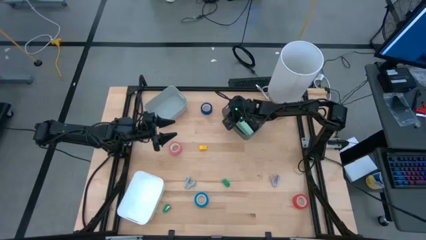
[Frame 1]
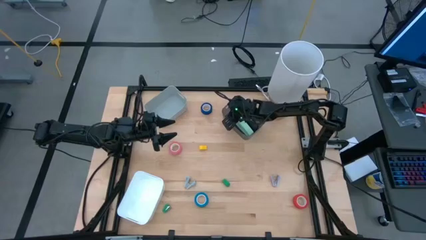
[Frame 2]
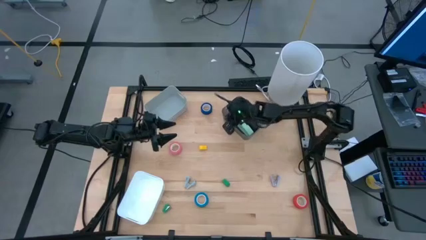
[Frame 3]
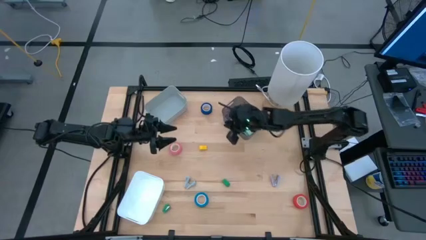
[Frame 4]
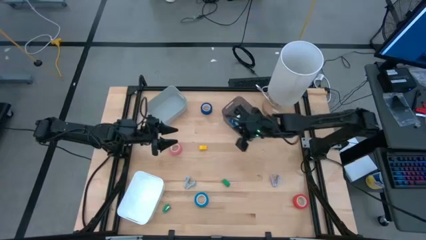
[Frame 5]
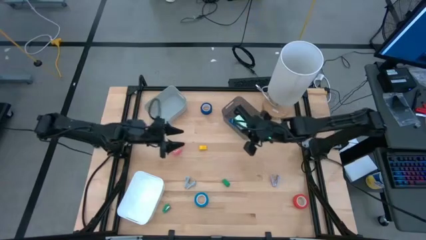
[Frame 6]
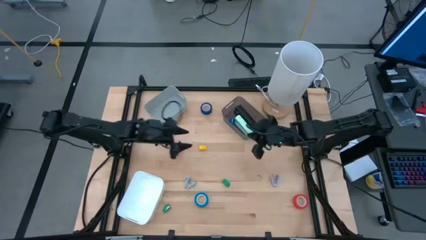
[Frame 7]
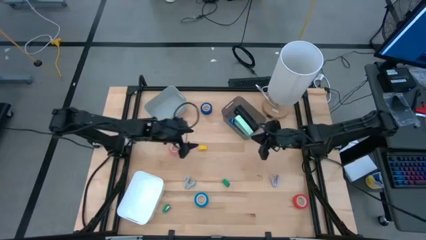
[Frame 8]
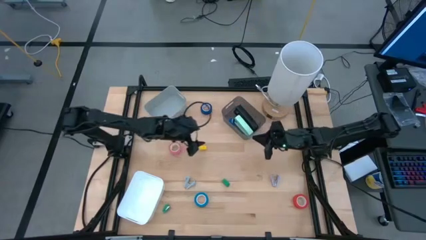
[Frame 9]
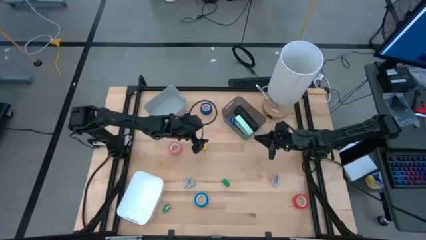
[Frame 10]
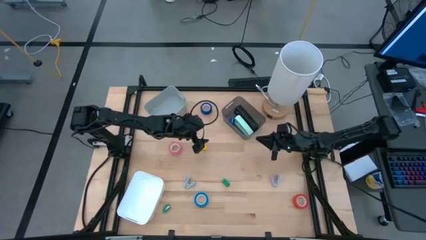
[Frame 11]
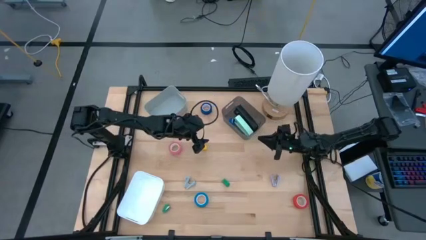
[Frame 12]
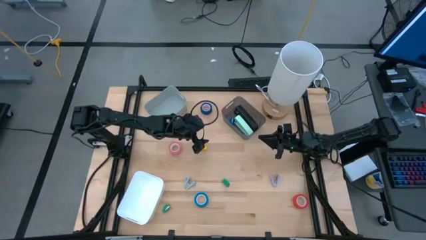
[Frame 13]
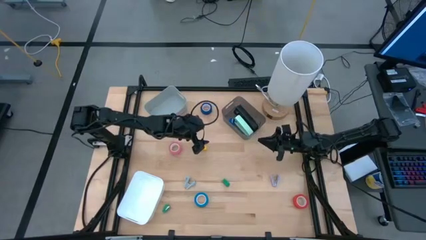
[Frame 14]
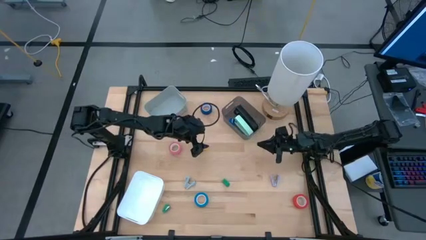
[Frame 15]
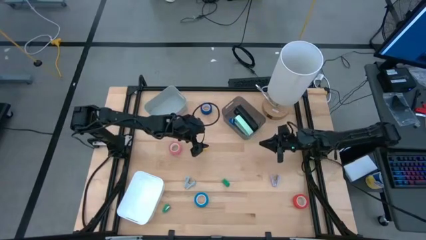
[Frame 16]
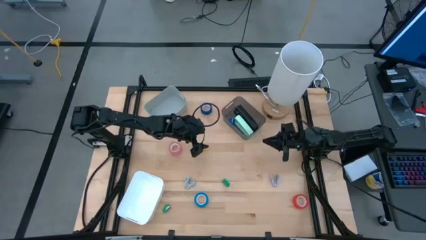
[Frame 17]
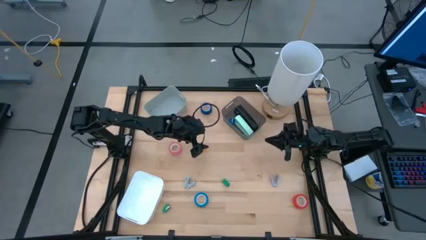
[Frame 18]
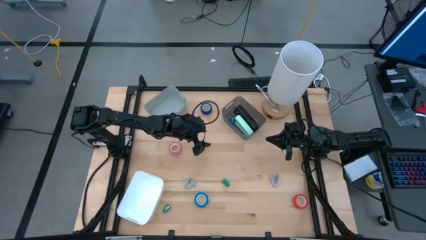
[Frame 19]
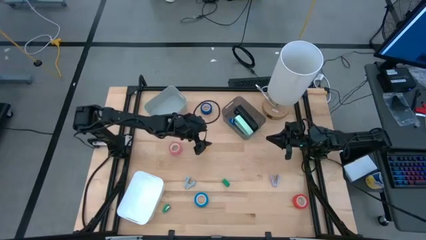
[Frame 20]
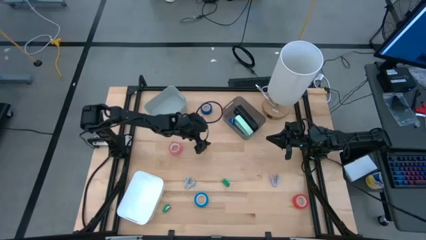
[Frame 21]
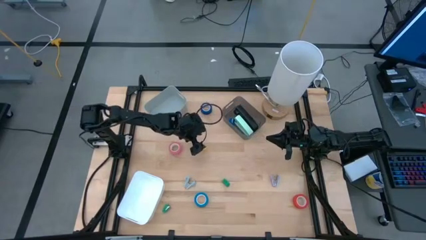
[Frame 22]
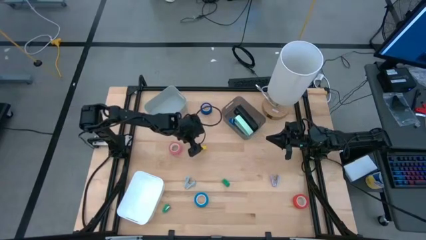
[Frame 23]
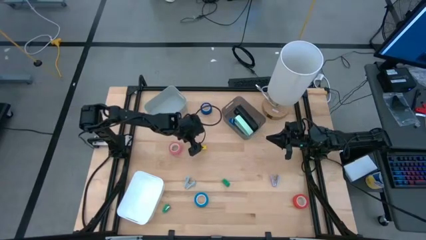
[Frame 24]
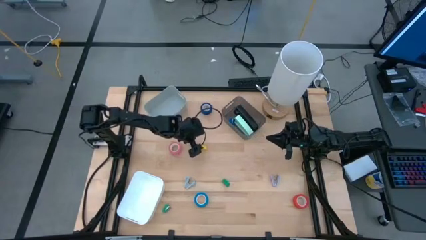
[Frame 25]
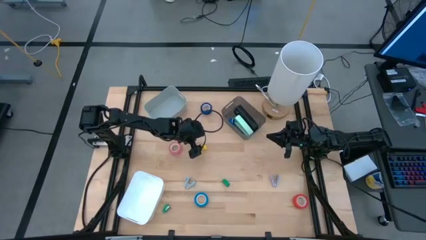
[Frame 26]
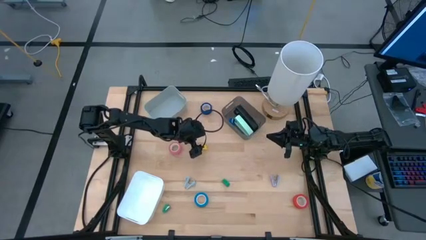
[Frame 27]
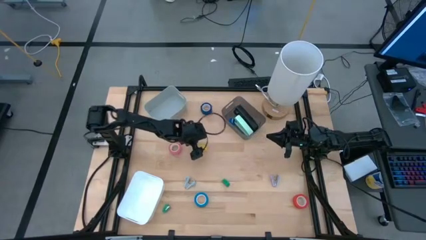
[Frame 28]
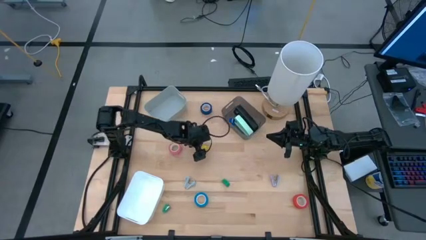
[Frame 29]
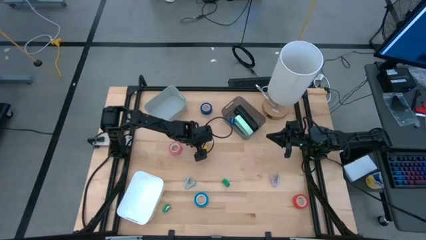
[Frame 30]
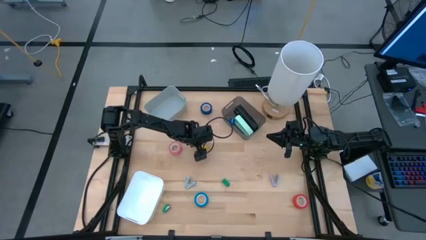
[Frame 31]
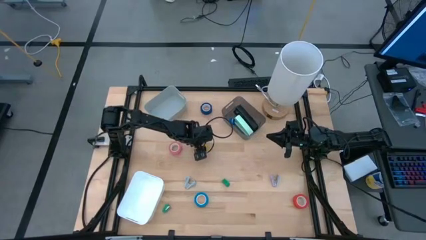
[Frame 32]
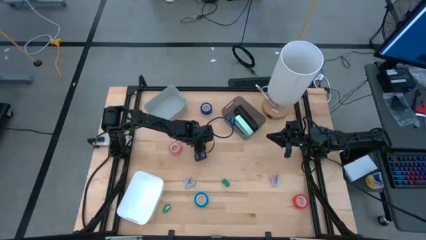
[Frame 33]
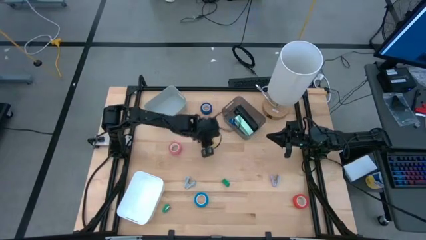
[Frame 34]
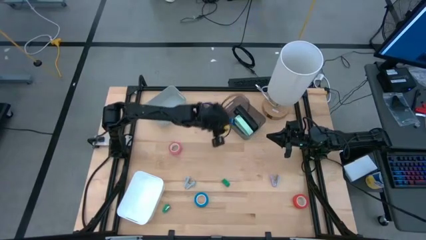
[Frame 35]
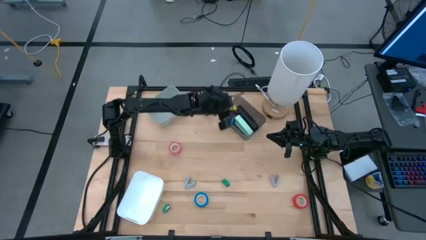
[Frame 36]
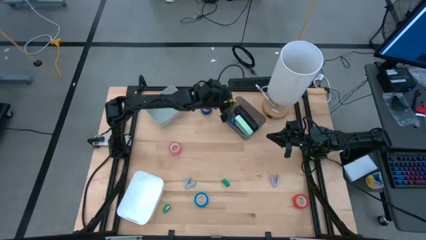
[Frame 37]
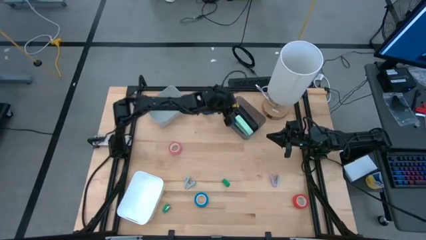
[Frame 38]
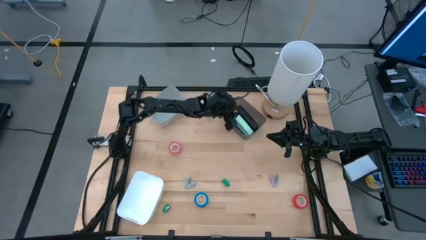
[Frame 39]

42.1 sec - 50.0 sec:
Task: Pick and place Stapler, Stapler remover, tape
Put the yellow stapler into the black bin

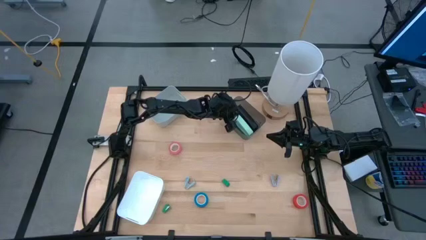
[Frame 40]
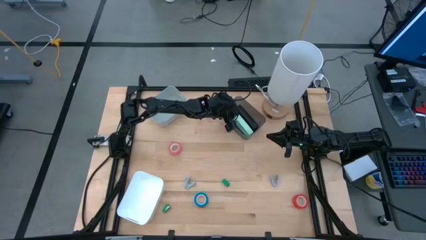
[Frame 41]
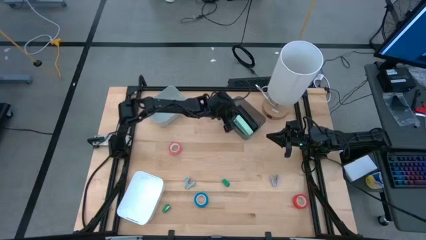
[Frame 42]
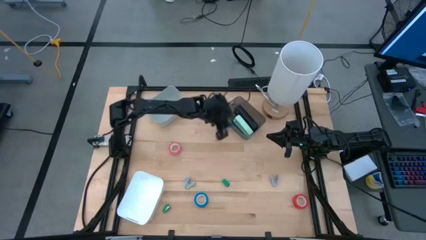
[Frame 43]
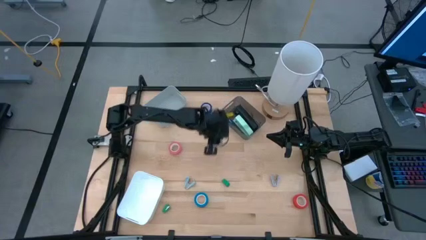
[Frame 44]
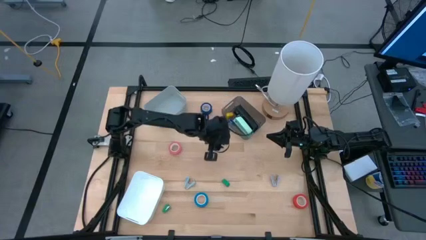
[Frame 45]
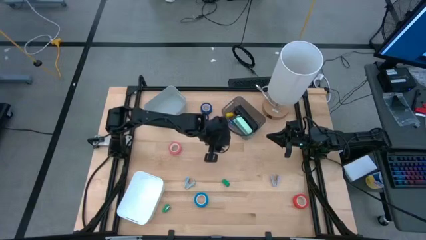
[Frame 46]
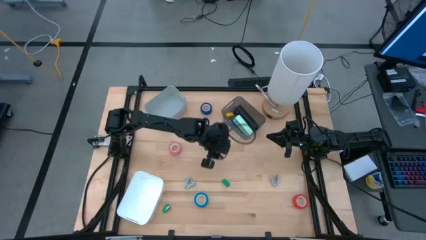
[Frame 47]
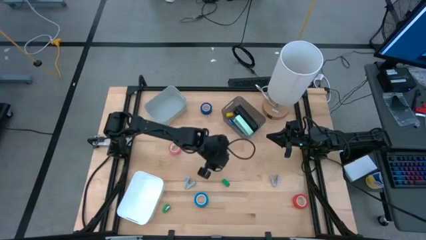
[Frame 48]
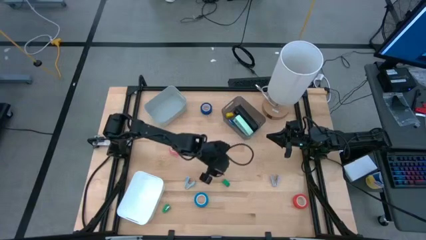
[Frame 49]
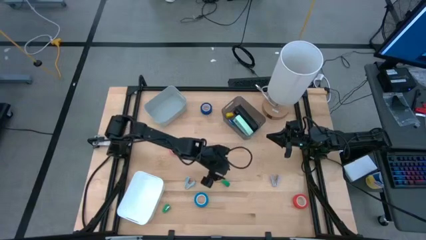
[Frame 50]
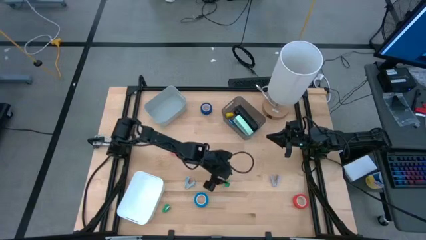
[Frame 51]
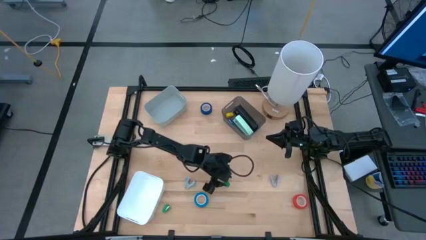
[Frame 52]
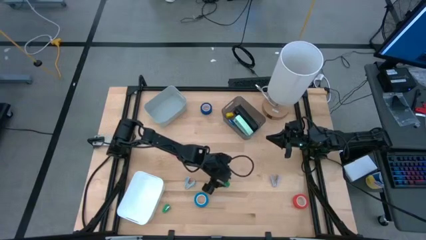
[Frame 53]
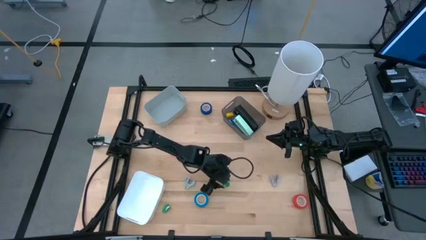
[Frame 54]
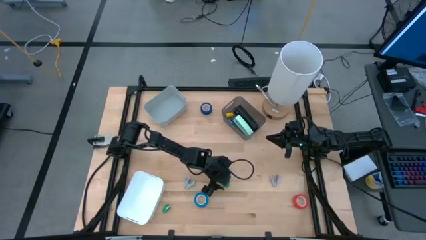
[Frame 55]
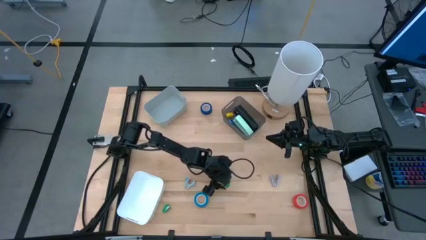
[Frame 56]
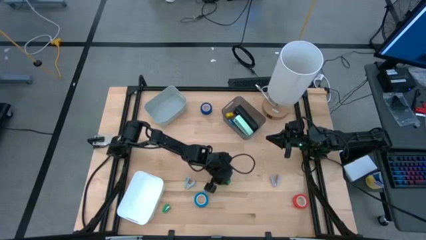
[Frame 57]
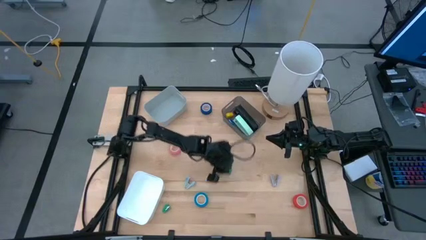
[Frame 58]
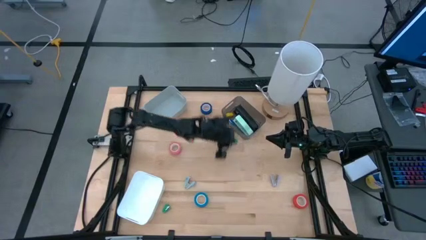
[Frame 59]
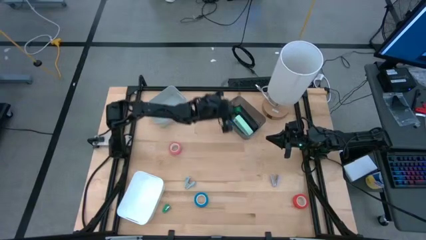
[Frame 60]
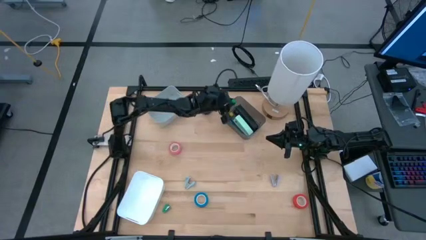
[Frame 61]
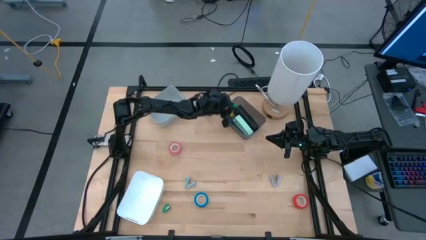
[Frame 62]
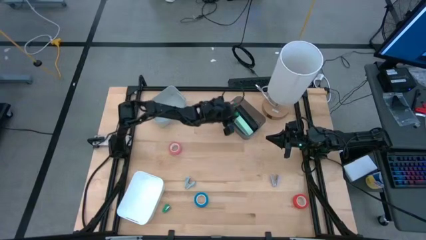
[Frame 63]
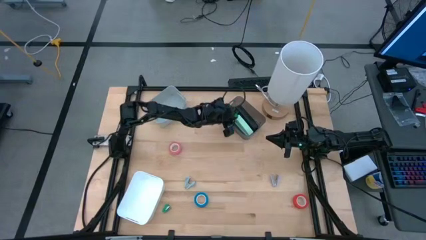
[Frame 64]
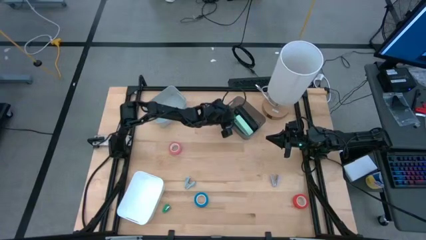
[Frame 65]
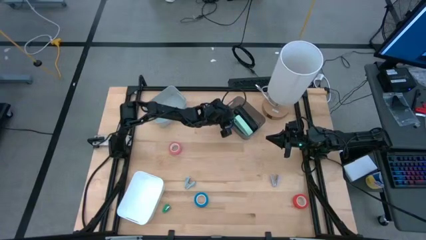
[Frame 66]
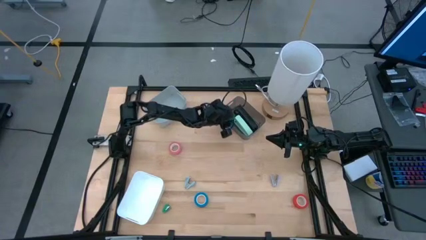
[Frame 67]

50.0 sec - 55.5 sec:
Put the right green stapler into the black bin
